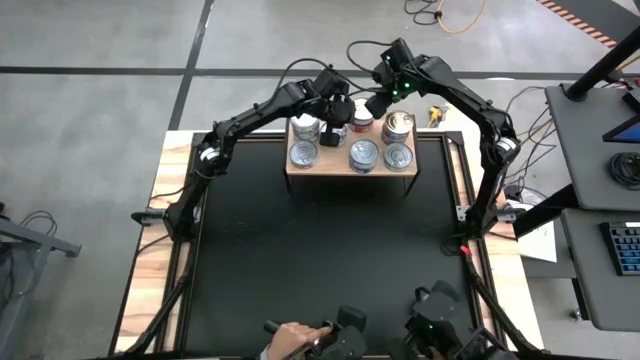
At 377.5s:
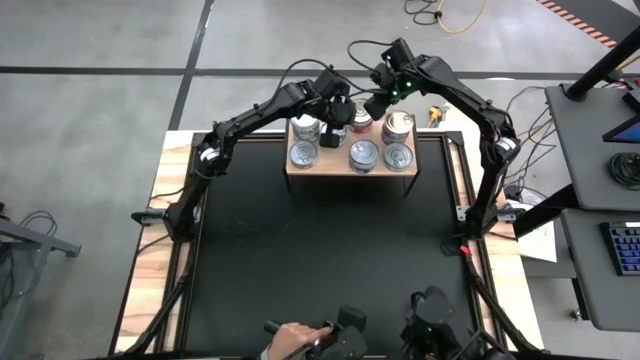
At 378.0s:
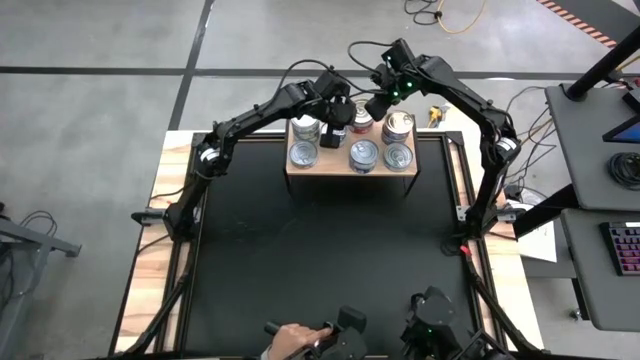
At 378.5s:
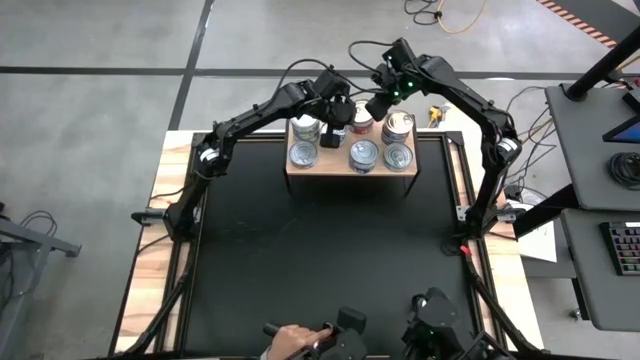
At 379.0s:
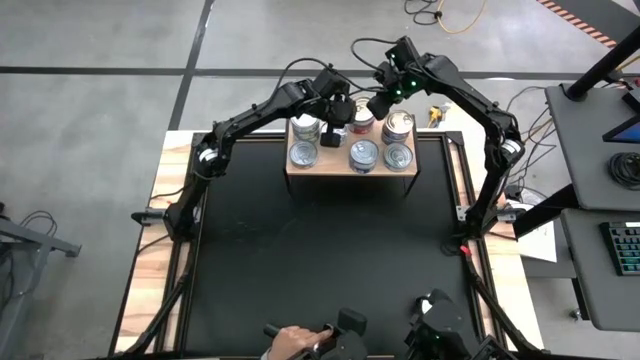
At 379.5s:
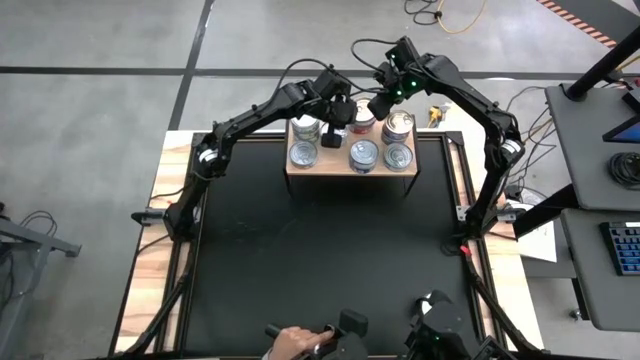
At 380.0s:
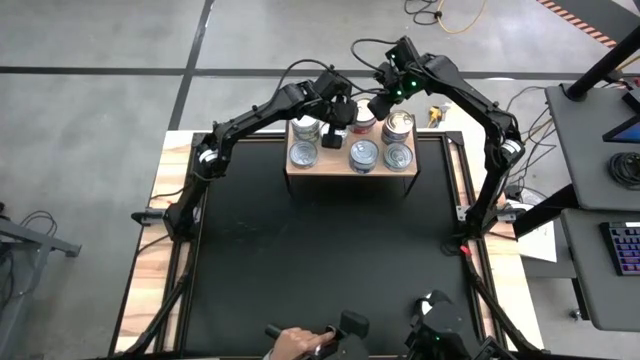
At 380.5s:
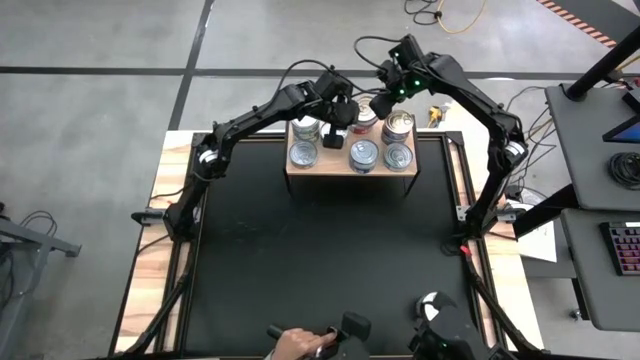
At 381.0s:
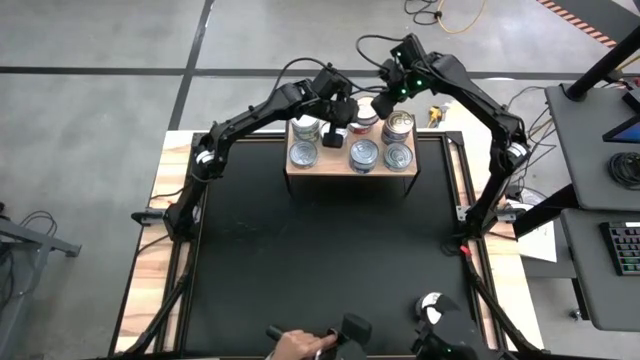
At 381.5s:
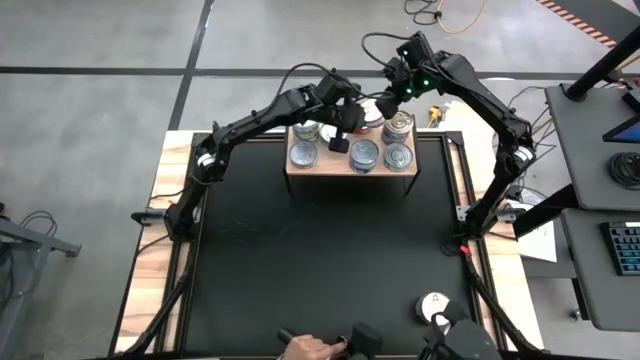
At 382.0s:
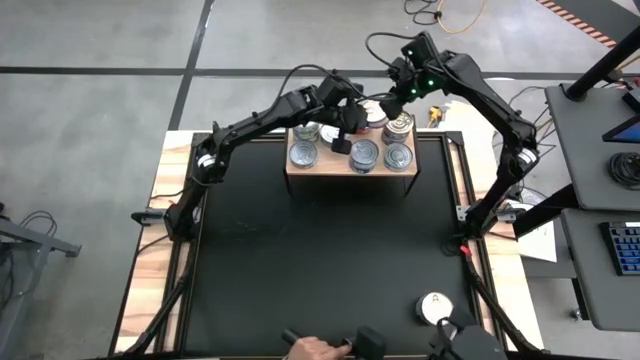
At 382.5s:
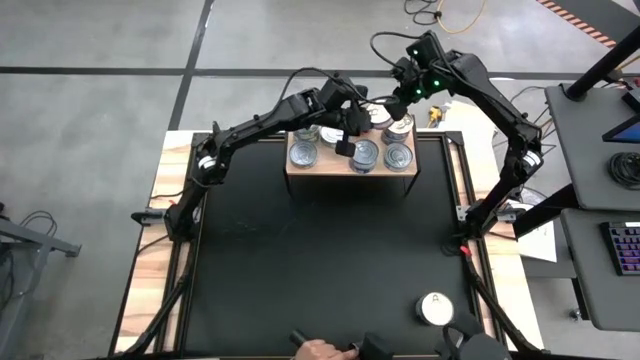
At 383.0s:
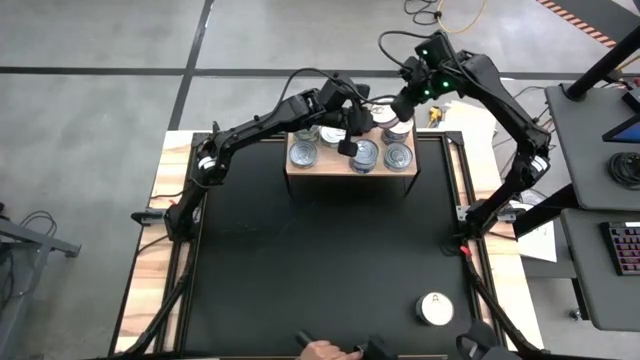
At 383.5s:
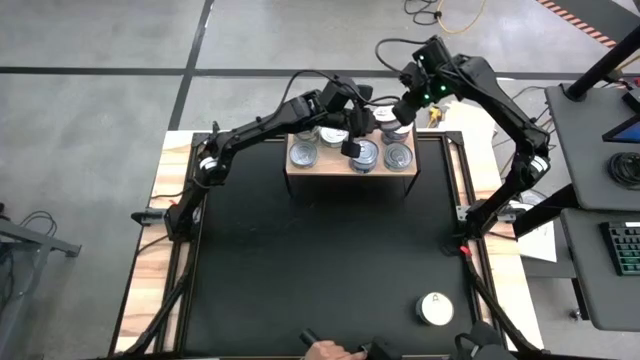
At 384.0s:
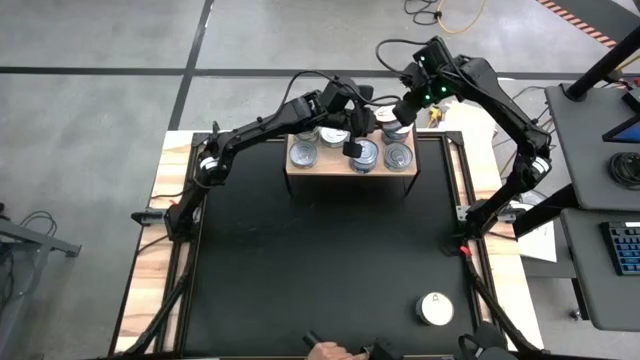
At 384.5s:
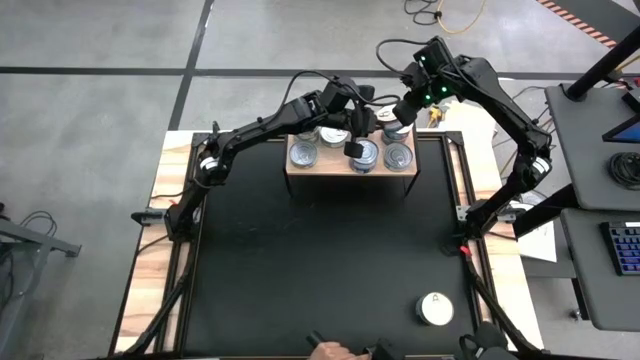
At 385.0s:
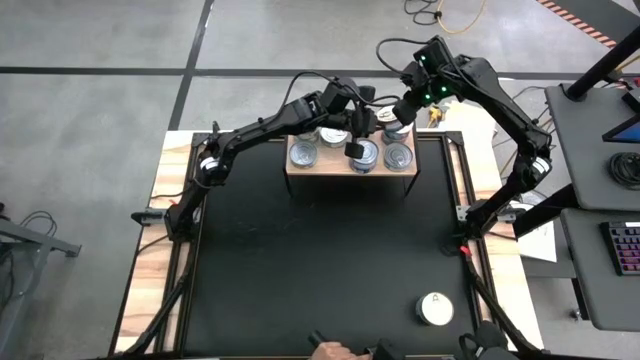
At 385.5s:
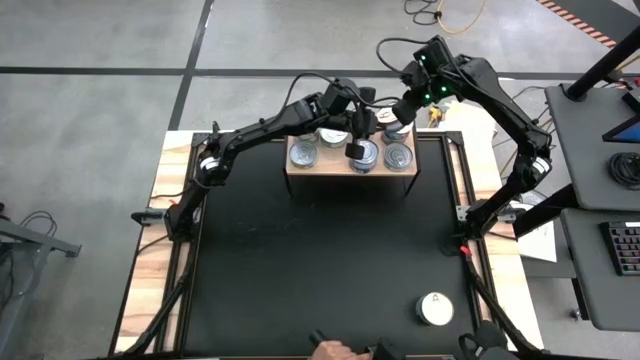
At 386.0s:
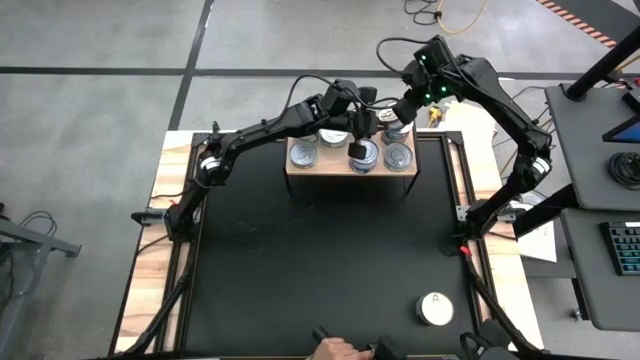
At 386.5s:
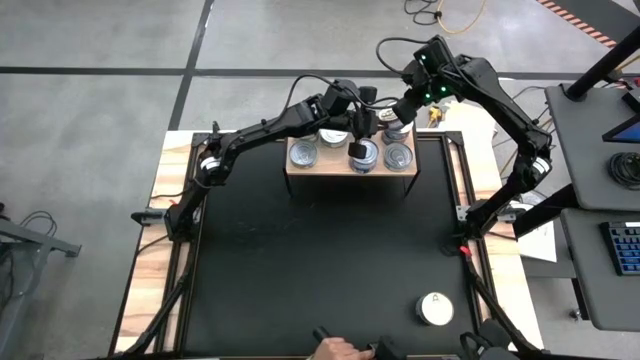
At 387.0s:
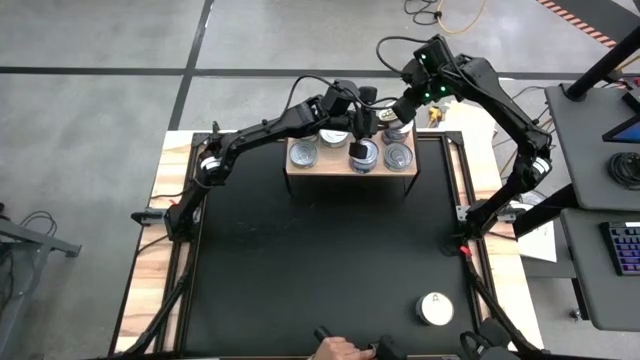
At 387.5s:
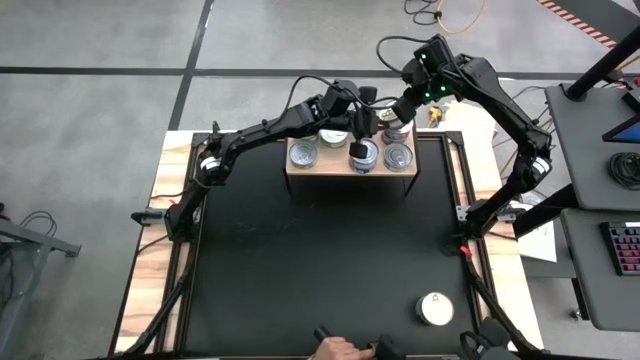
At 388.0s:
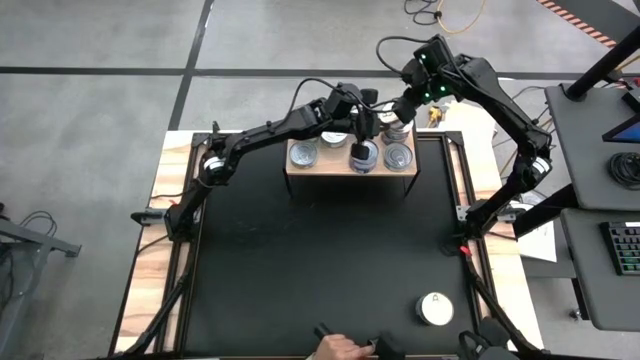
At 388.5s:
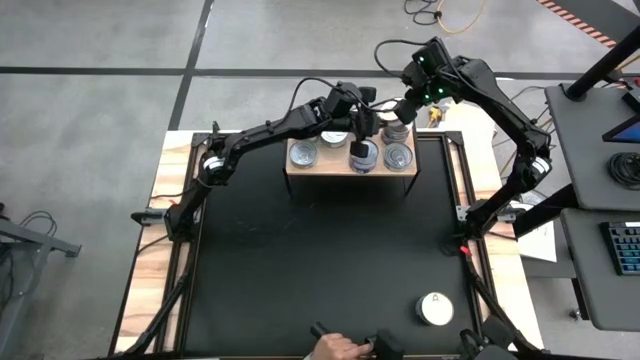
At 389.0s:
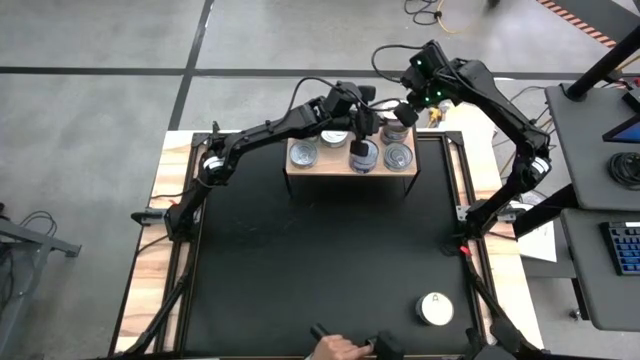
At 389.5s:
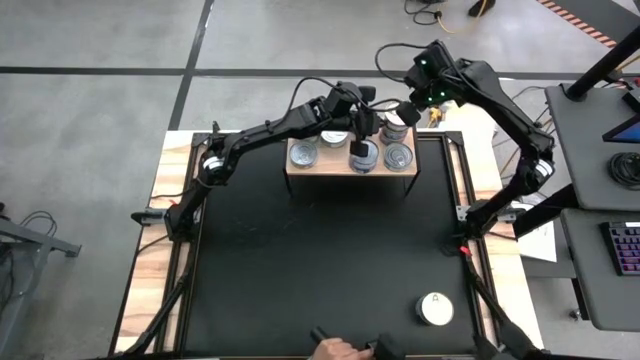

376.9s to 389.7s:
Task: Stack canned seafood by type on shelf
Stack the blue pink tuna can on top of the blue pink tuna can on the shelf

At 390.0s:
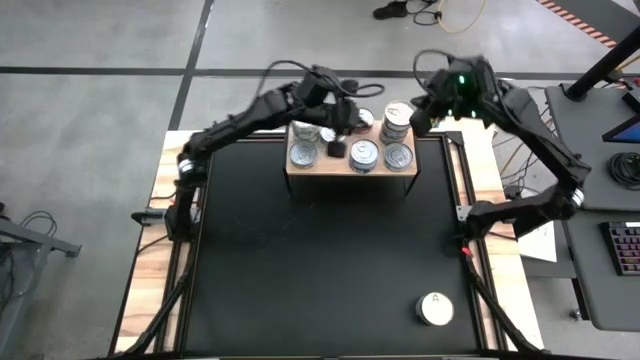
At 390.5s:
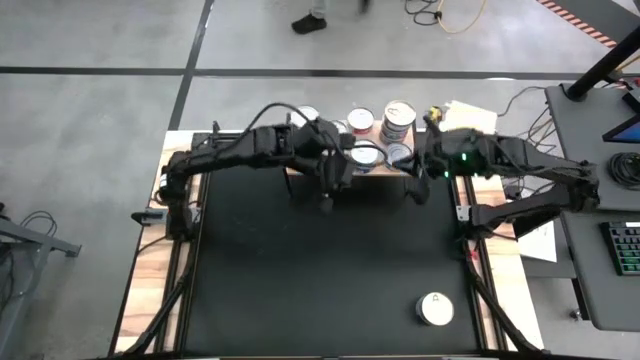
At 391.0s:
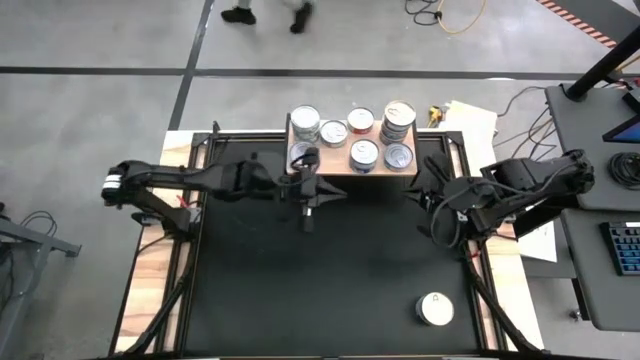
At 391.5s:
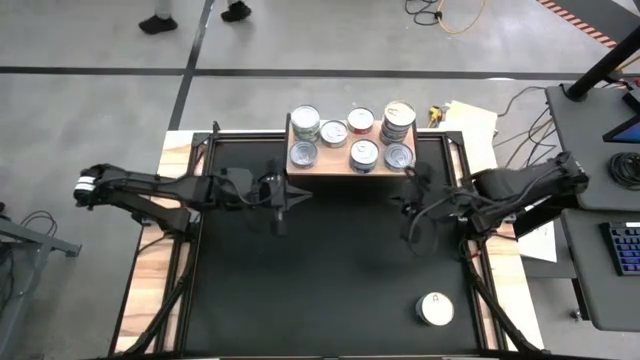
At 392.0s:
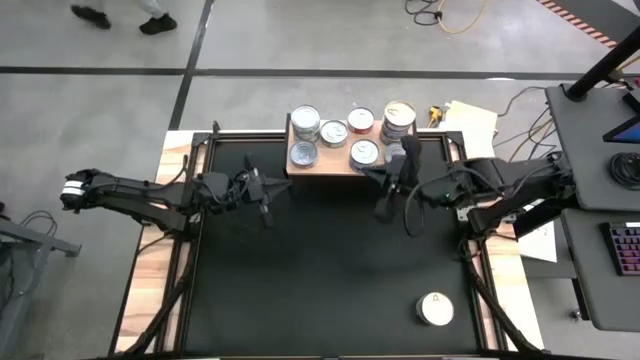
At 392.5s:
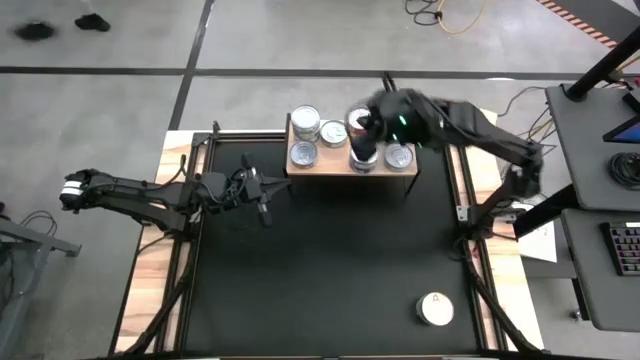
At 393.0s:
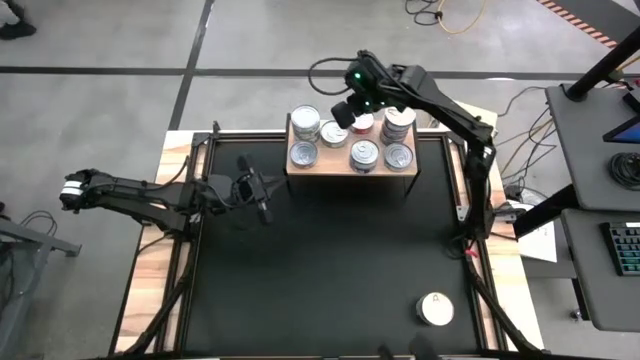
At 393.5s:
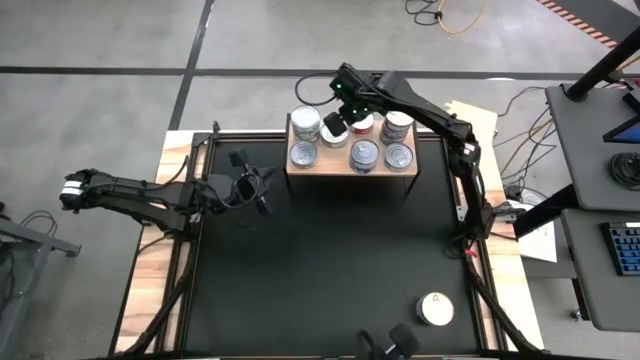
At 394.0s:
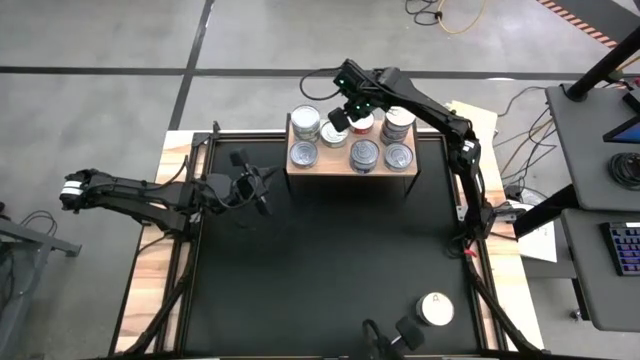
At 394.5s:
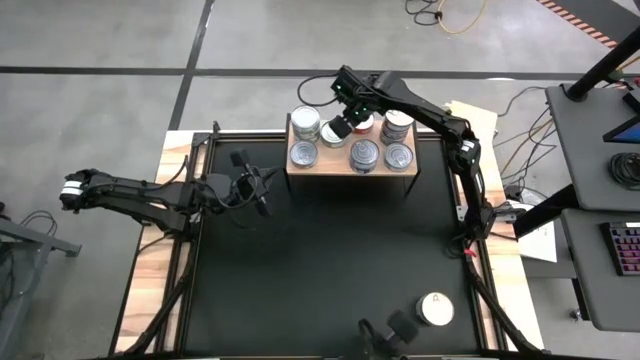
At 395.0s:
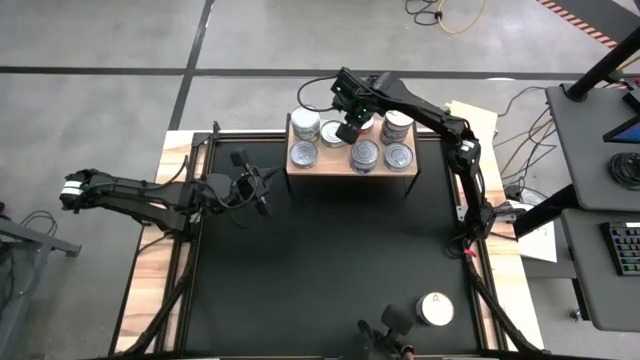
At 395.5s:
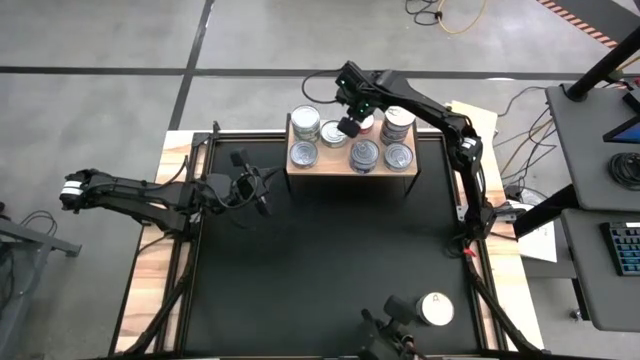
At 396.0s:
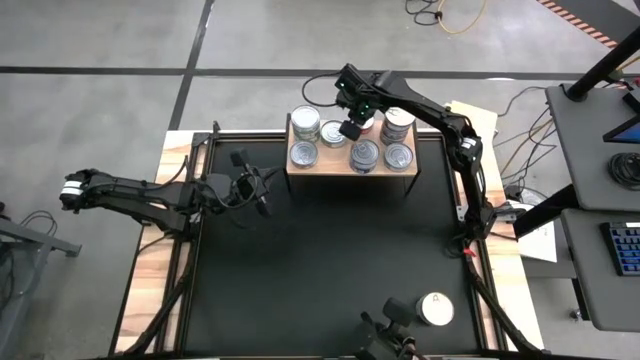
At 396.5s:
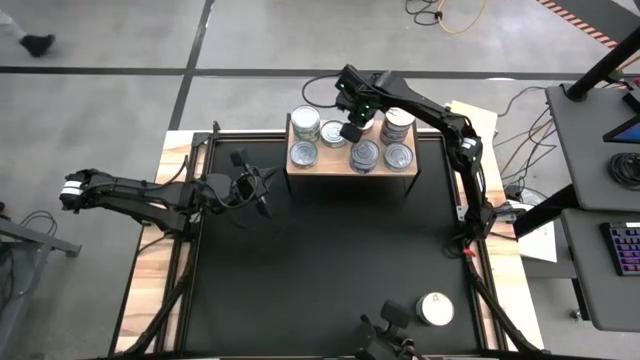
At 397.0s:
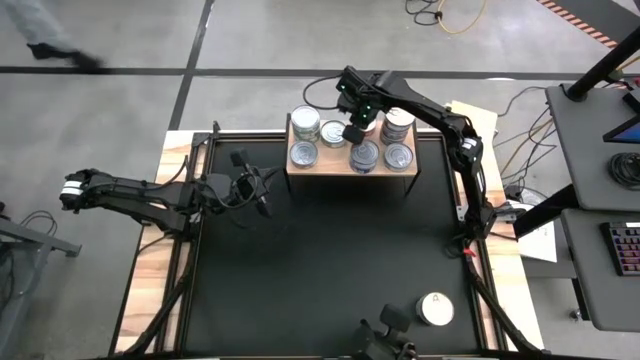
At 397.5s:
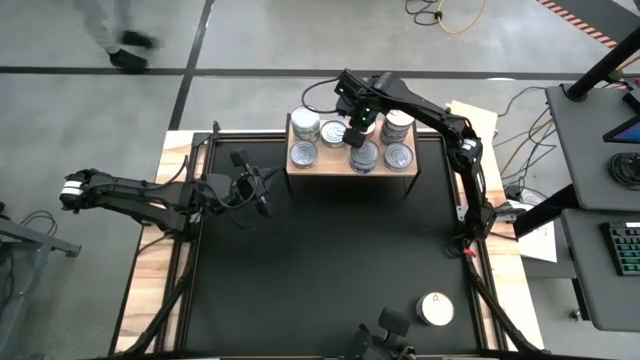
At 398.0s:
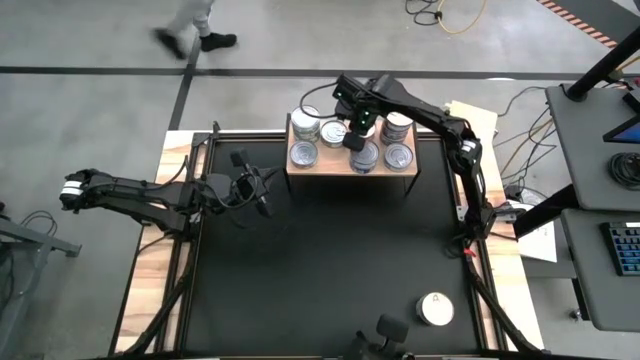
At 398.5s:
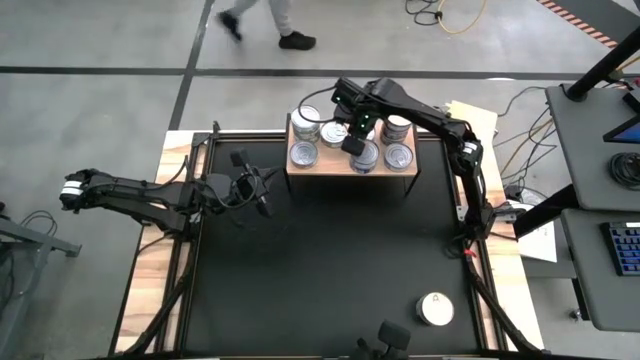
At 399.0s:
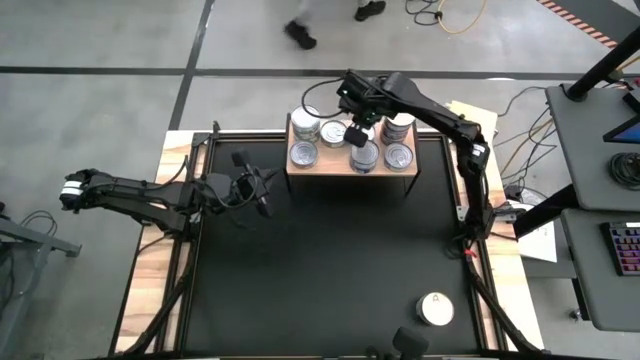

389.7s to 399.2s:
Adjust the red tuna can
